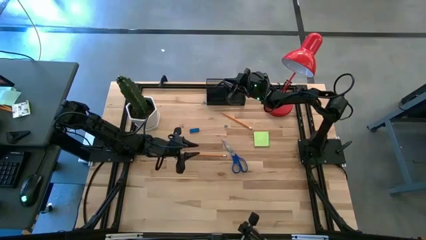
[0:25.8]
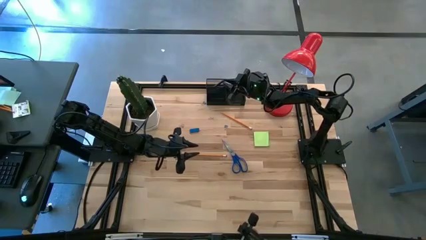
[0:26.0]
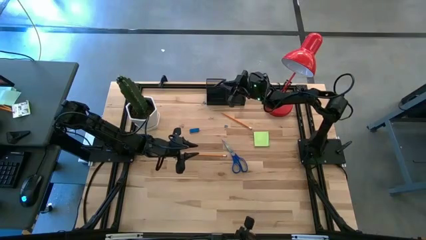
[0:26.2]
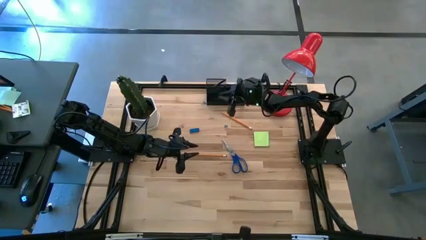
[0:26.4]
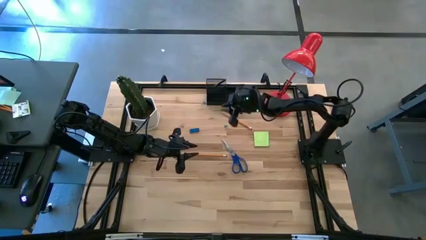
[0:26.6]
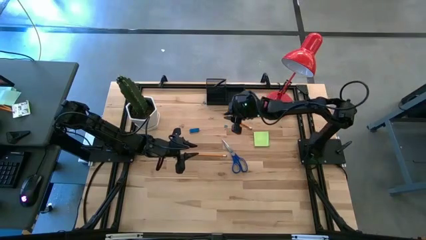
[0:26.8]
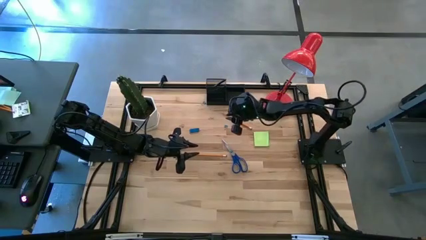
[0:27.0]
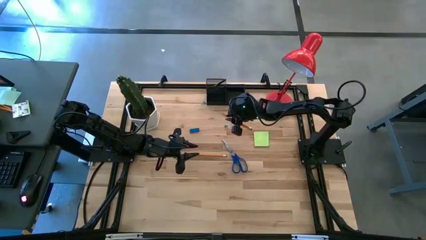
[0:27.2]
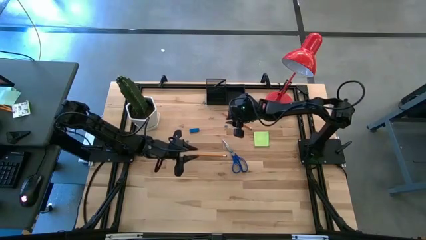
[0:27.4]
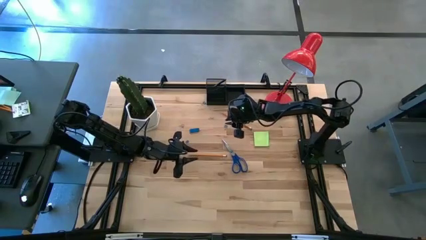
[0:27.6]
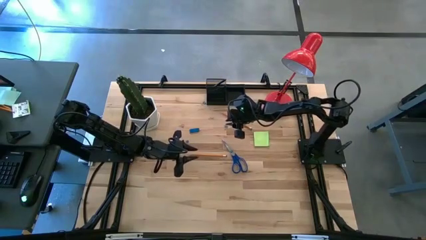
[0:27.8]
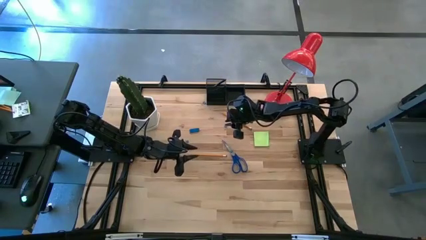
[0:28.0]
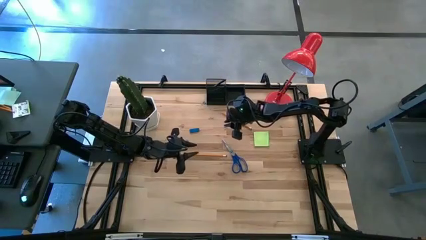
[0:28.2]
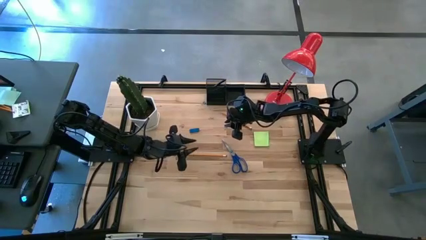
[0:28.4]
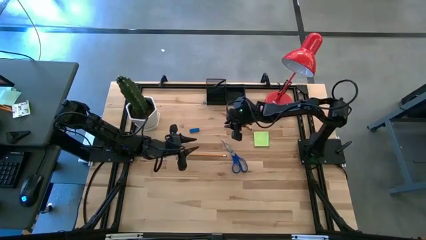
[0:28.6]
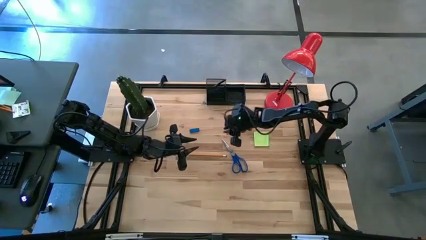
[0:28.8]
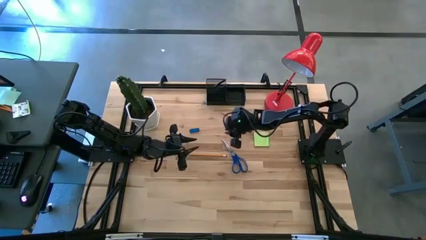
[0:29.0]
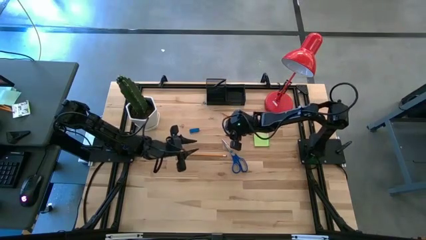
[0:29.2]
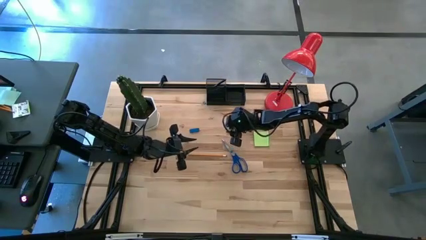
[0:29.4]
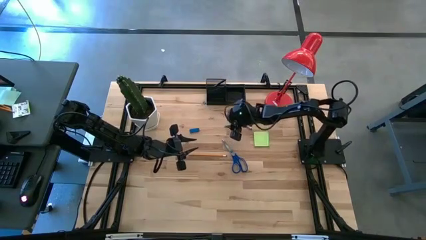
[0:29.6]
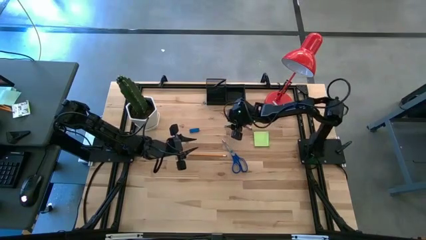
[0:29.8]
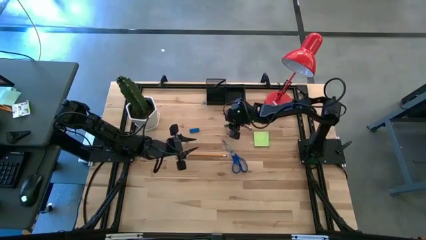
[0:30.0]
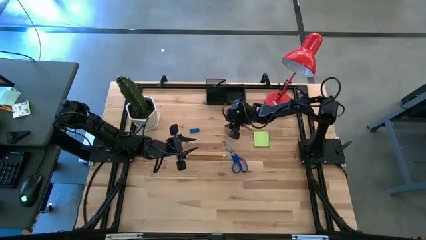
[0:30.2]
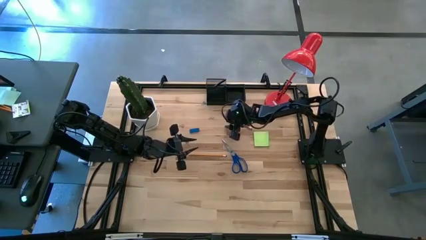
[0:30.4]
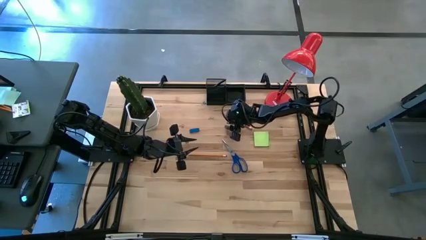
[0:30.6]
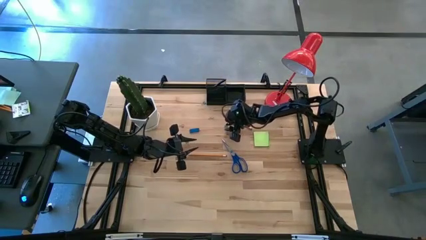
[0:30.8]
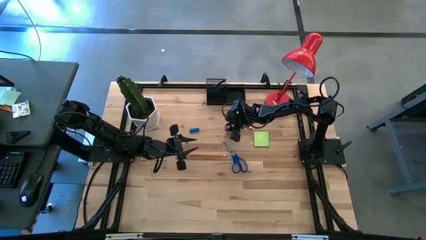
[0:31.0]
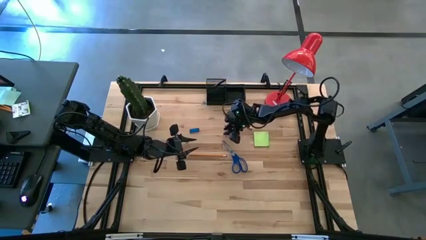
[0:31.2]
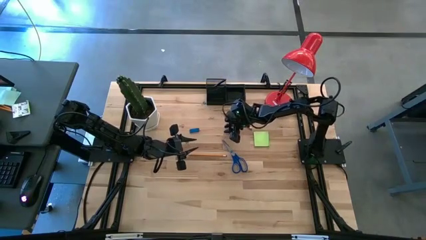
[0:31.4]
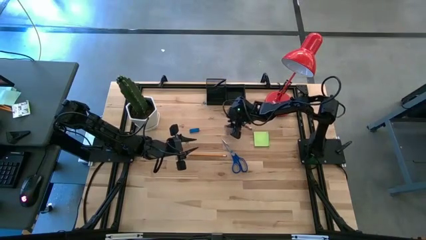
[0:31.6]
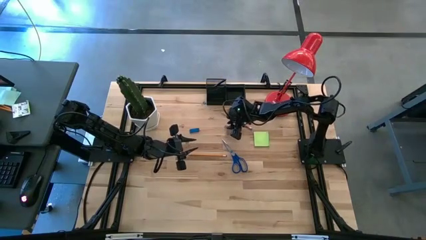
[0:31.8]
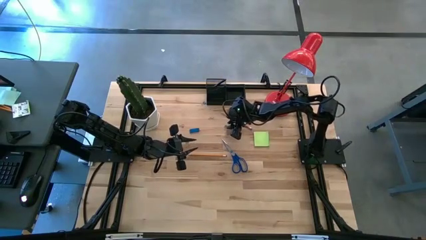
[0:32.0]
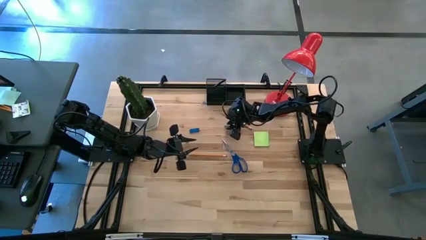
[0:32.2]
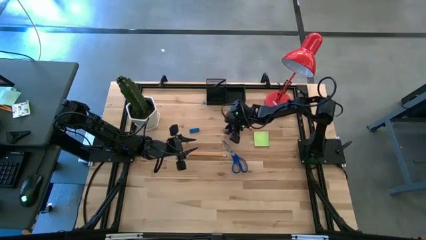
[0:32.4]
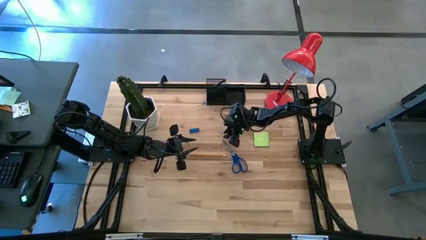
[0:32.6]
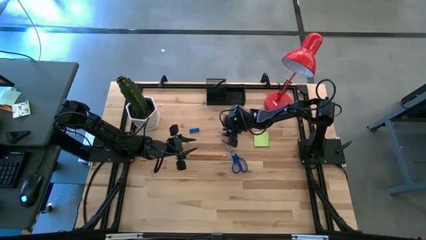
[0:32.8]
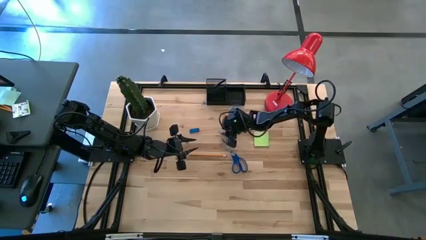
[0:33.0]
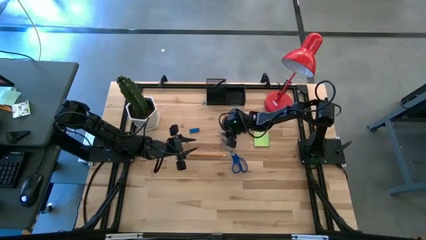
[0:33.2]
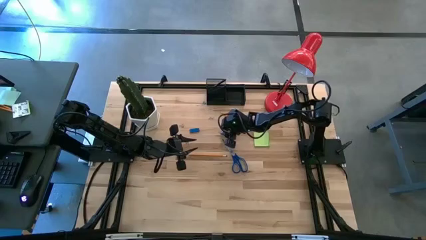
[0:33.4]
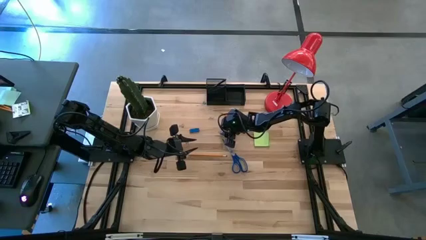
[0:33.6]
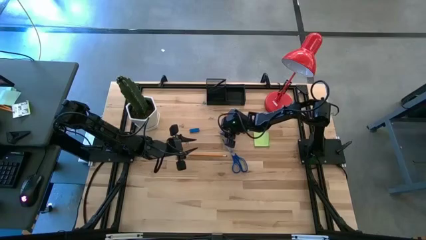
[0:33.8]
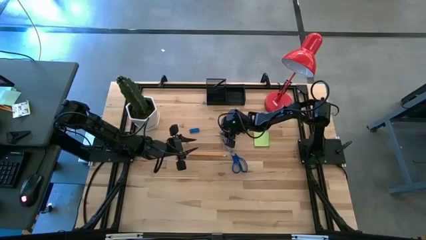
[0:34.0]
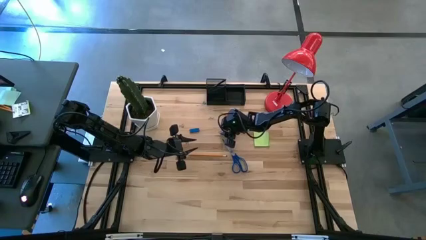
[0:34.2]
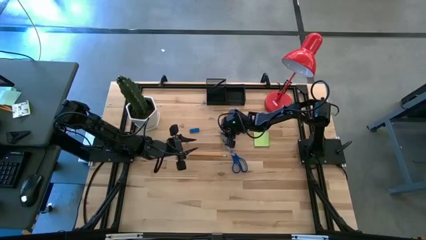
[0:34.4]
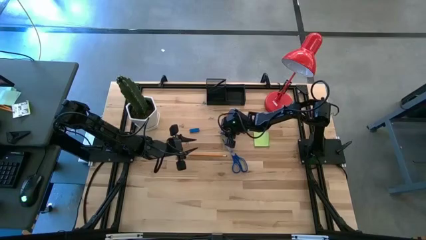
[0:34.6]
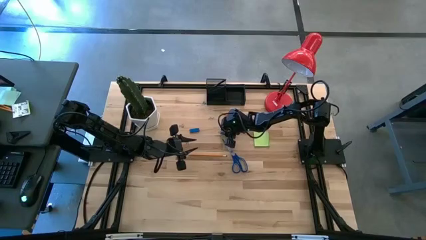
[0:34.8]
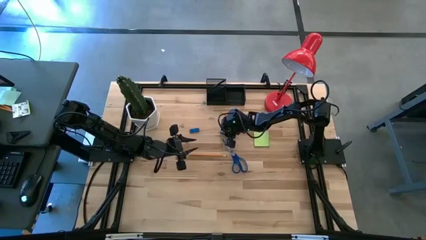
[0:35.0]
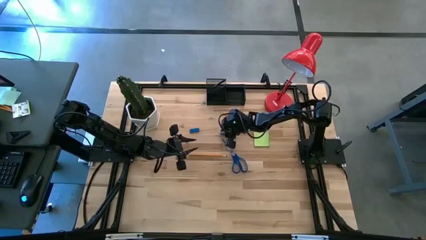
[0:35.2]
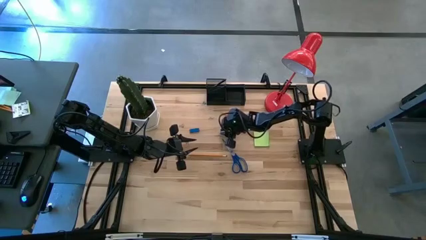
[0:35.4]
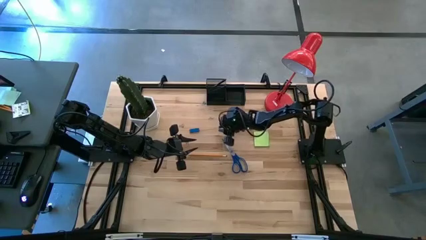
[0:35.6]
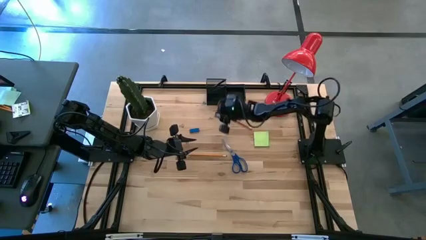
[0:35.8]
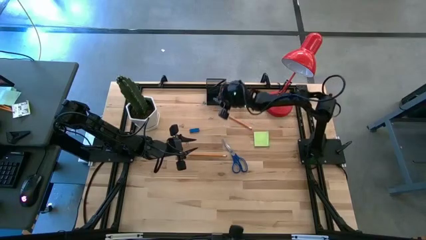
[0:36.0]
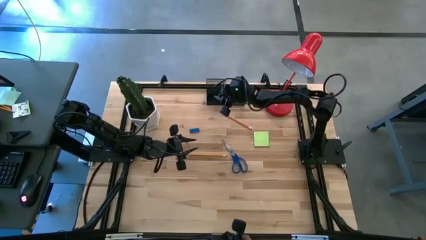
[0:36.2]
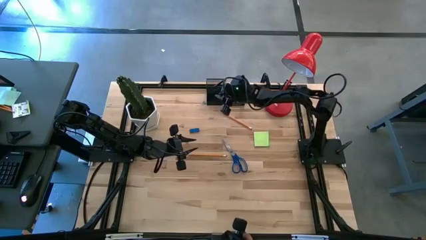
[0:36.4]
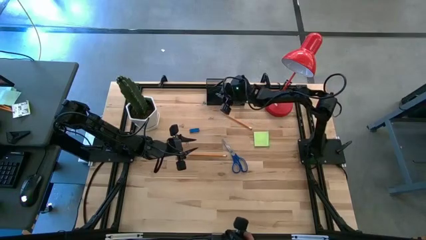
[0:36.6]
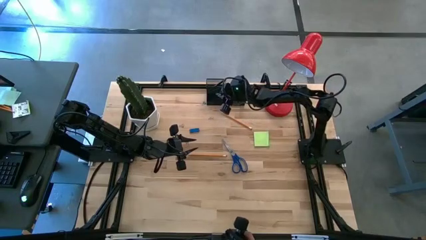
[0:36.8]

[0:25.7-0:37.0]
Task: Pick and place office supplies into organizer
Put the middle blue binder clip into the bottom left section of the desk organizer
